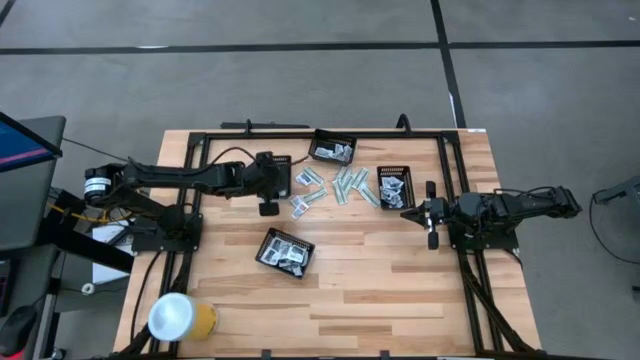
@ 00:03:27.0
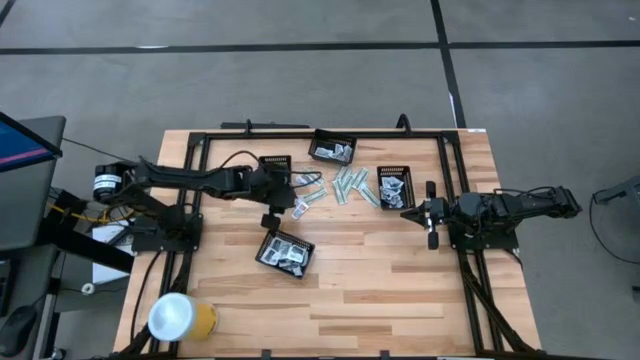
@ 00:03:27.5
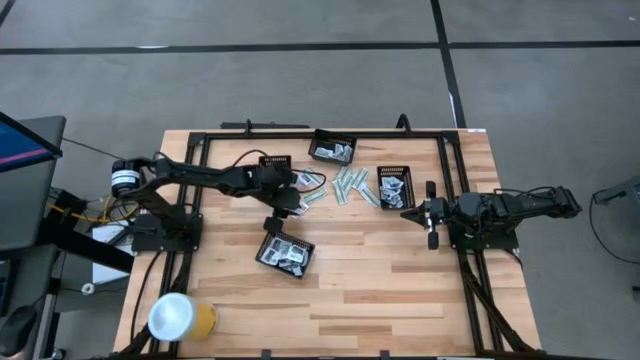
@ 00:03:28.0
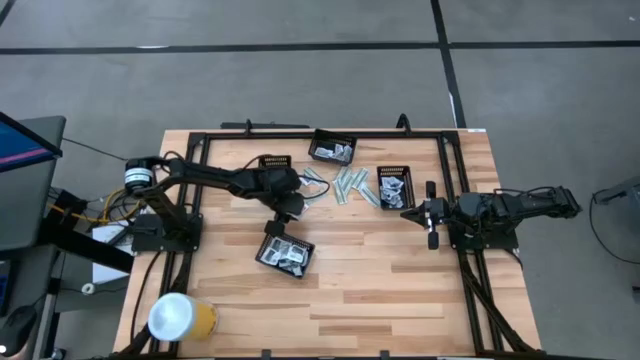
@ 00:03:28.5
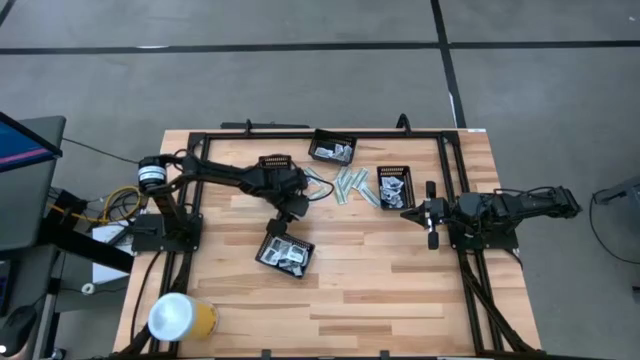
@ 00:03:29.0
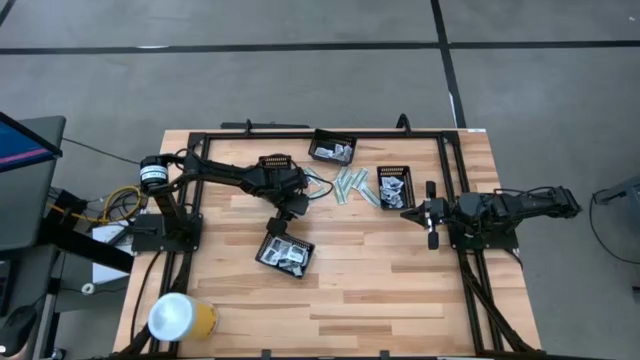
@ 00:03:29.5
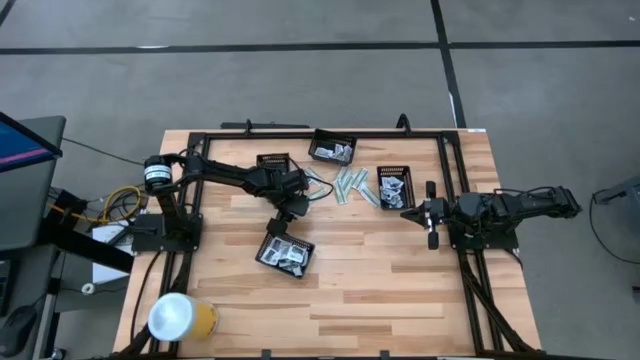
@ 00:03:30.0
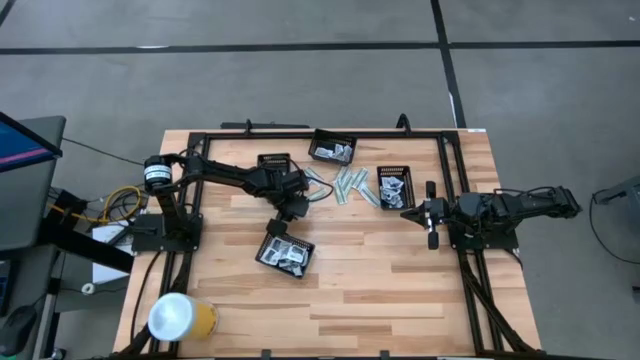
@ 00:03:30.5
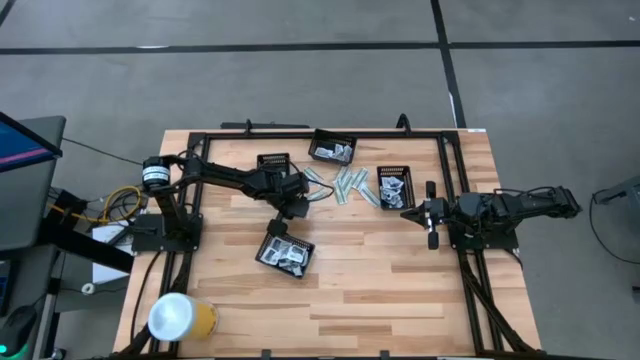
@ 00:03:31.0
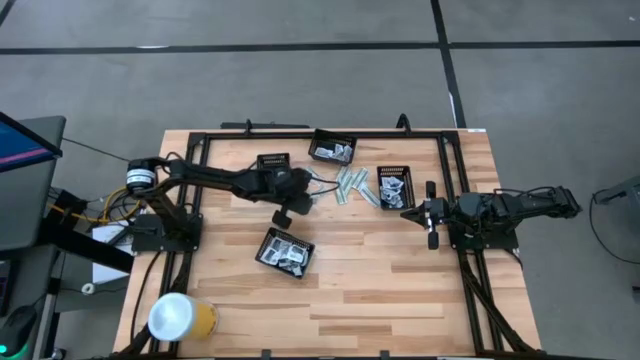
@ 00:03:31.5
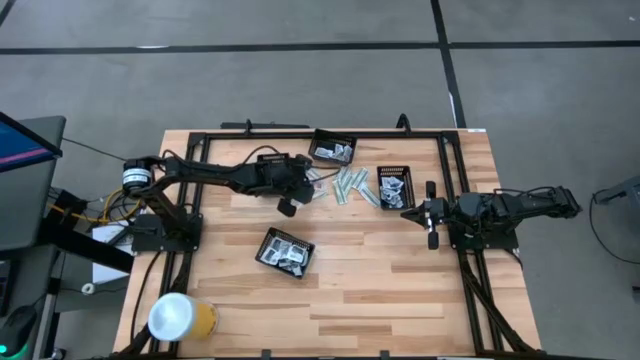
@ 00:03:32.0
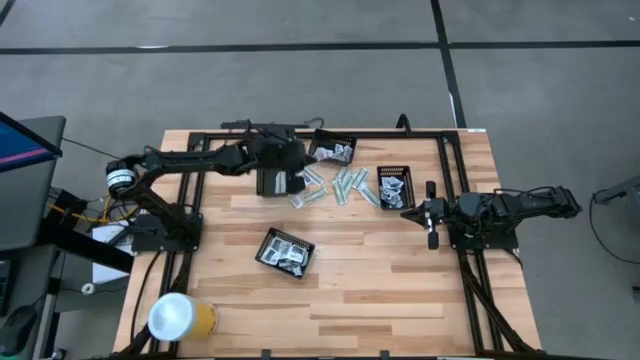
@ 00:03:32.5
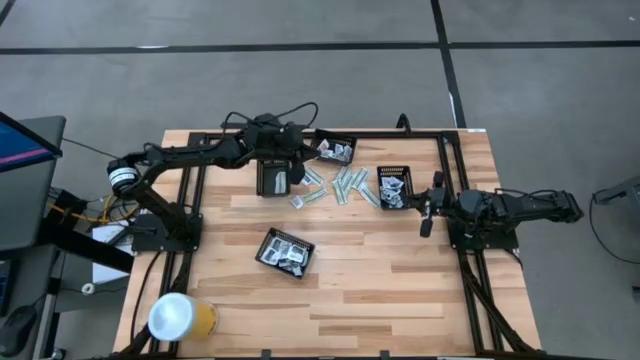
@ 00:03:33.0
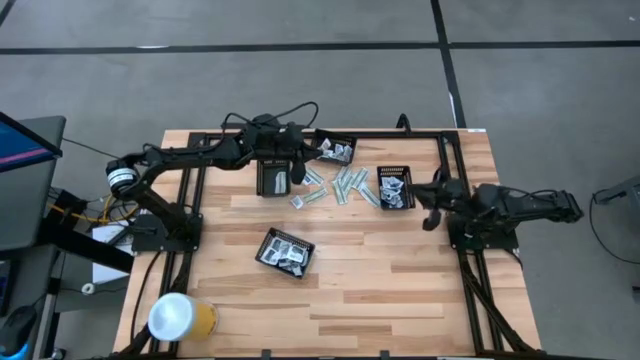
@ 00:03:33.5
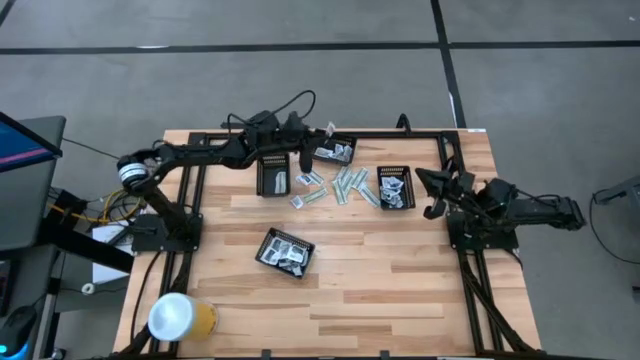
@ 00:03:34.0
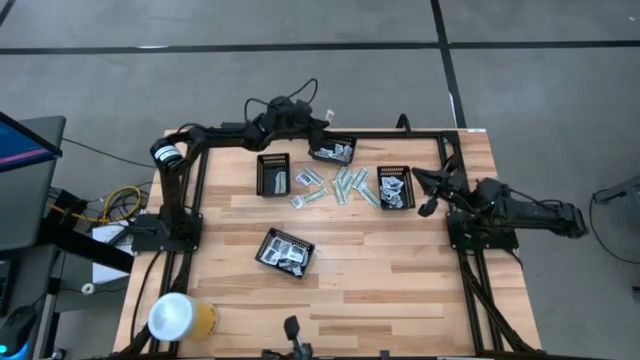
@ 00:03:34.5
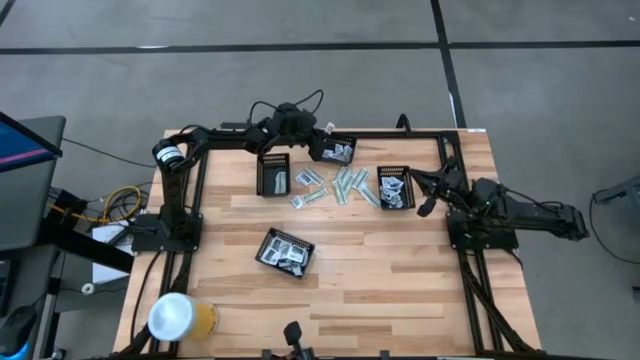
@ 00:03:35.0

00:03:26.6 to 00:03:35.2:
Task: Pick & Place First Aid Supplies
Put the orange ointment pack into the top black bin

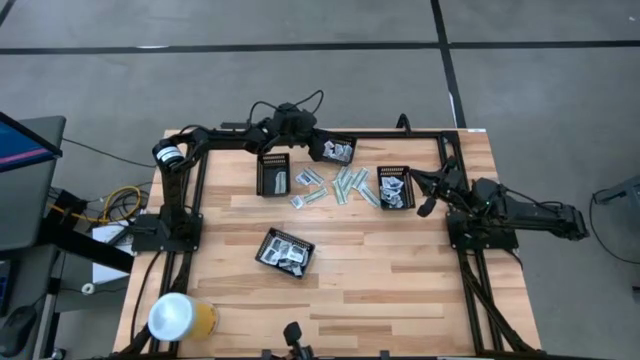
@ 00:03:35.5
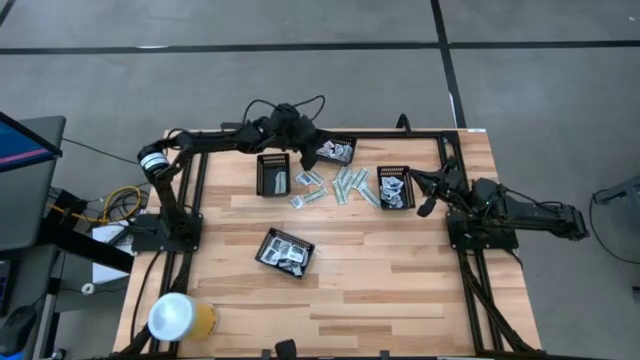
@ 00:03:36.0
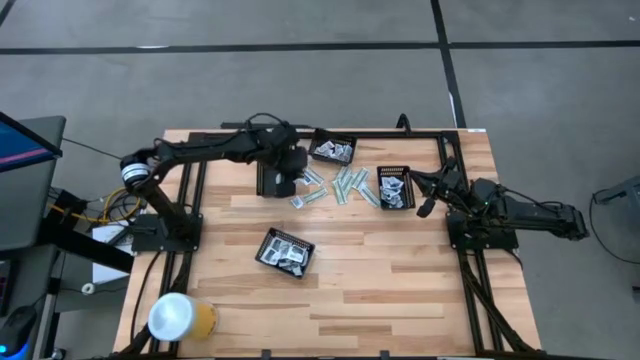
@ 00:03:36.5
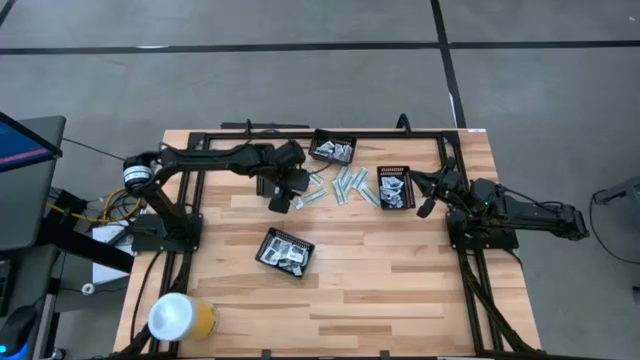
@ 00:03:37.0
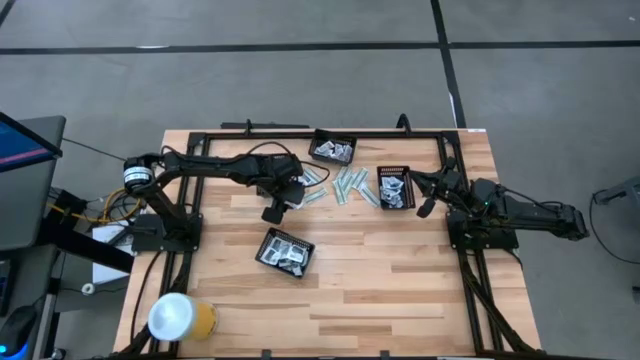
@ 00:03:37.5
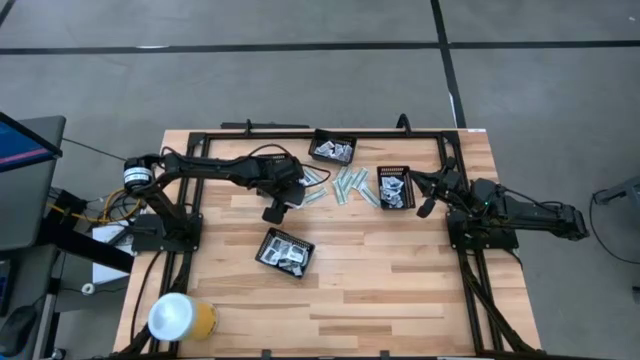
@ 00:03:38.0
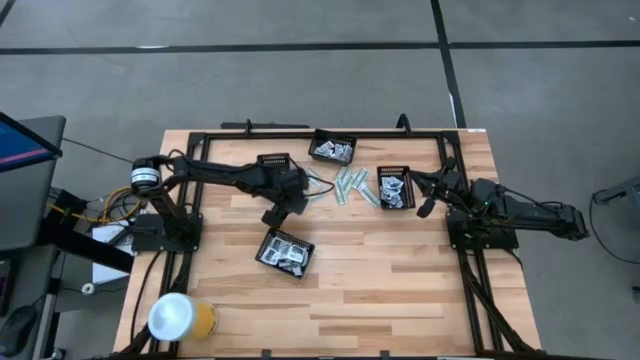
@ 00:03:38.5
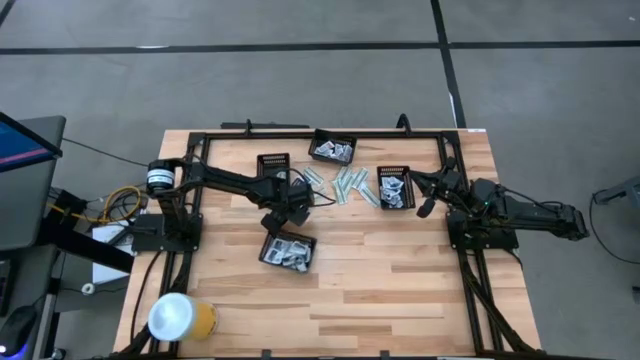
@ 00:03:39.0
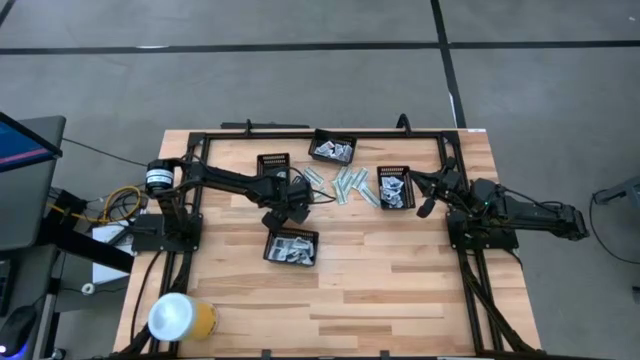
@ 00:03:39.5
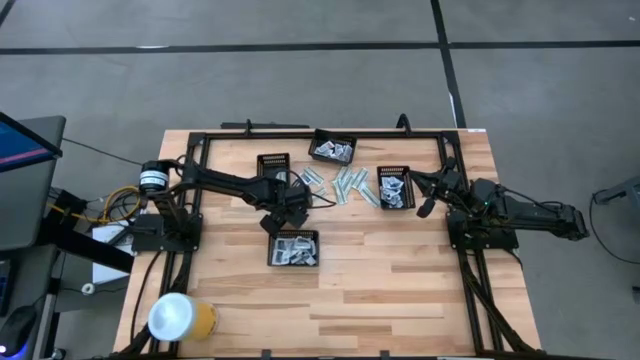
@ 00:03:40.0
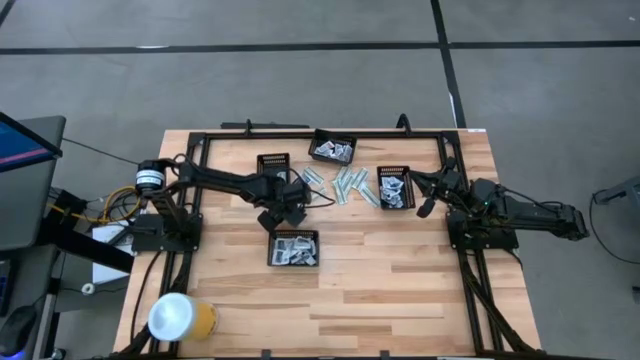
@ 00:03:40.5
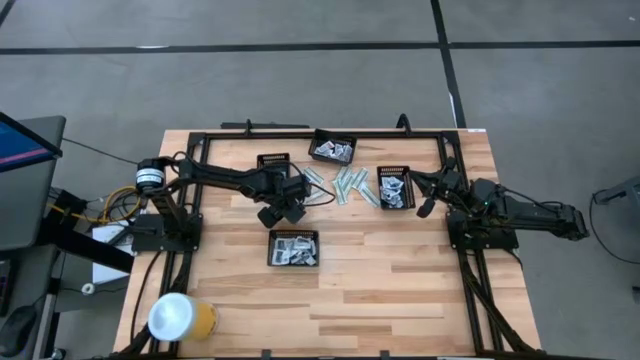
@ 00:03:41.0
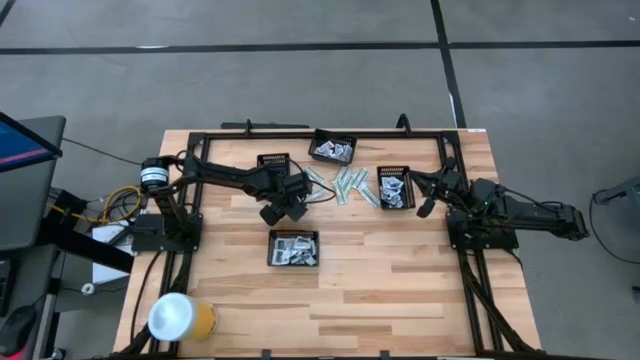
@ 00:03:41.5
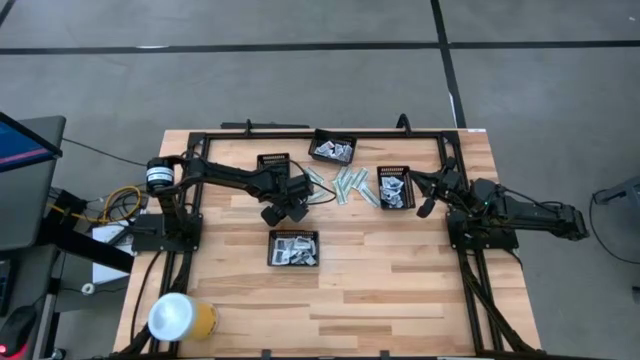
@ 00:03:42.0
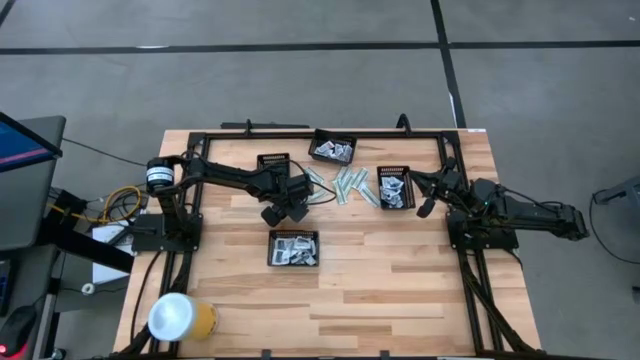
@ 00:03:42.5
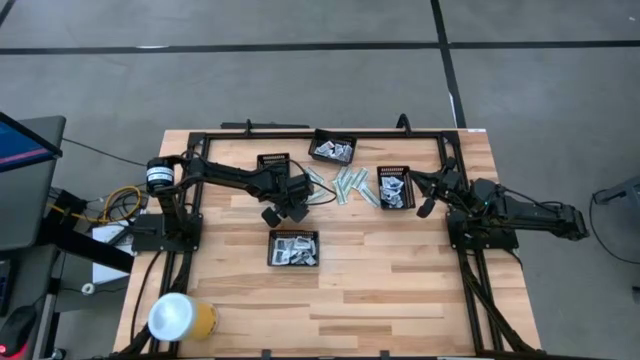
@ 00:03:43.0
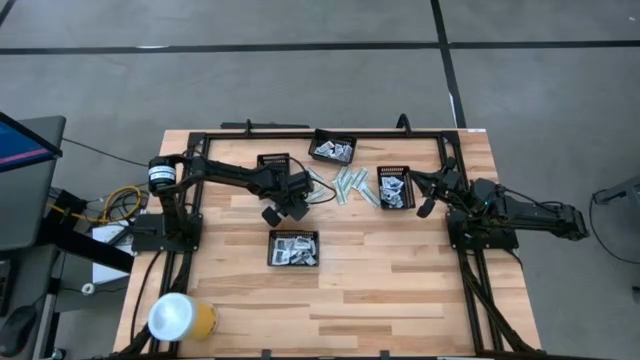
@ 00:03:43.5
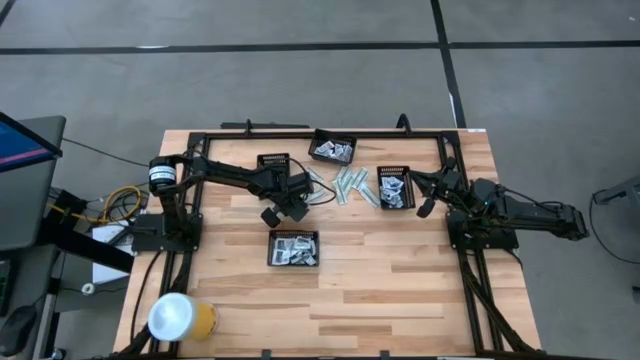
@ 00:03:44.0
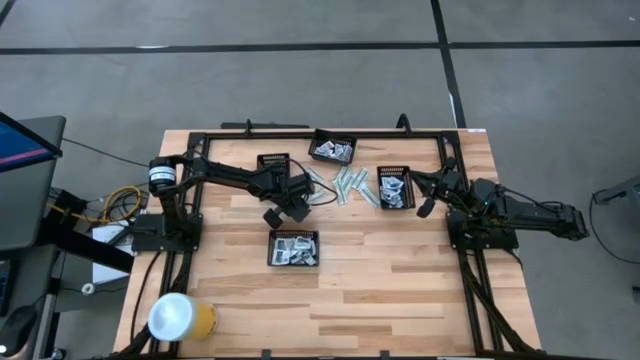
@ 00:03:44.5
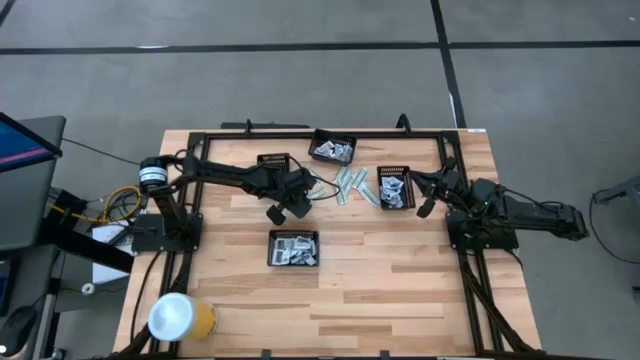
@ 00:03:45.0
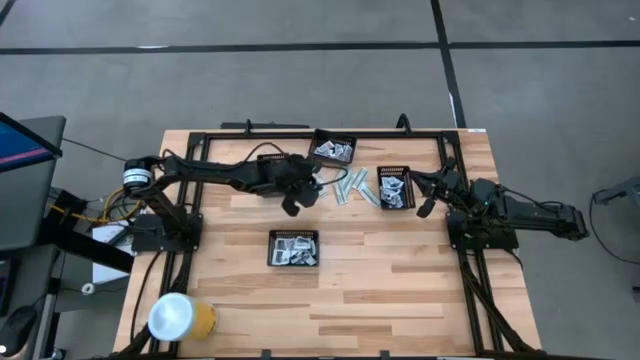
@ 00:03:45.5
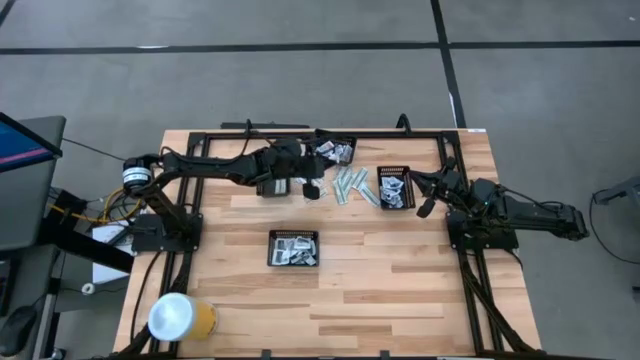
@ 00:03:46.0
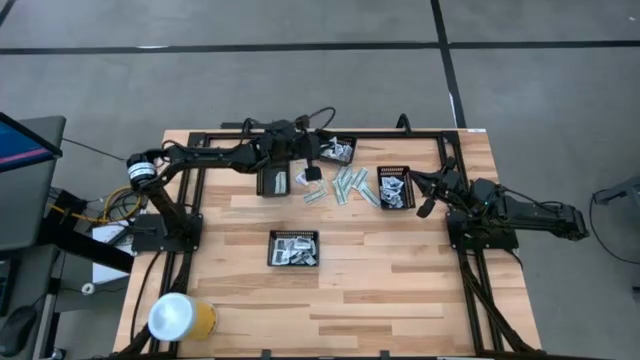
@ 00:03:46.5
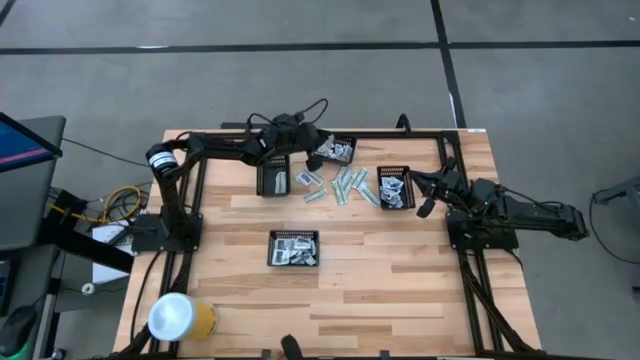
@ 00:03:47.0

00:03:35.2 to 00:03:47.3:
Put the orange ointment pack into the top black bin
